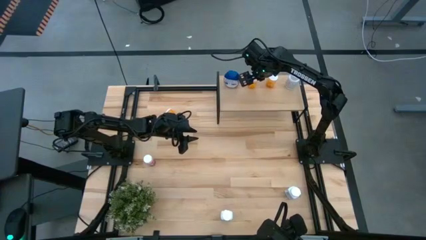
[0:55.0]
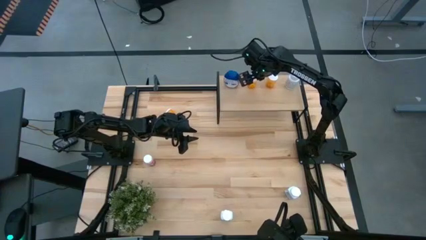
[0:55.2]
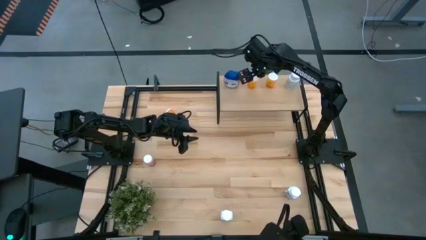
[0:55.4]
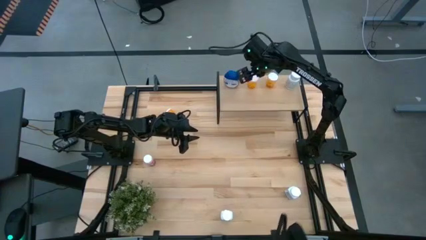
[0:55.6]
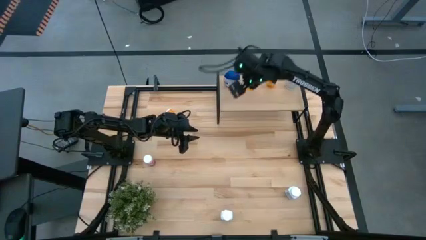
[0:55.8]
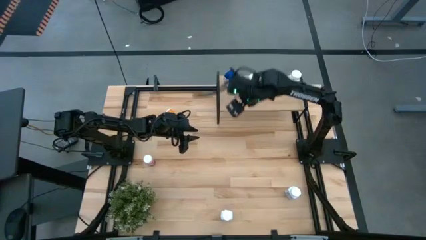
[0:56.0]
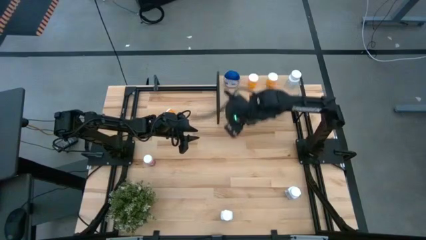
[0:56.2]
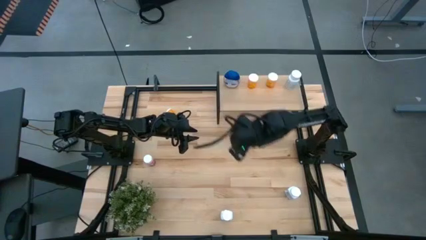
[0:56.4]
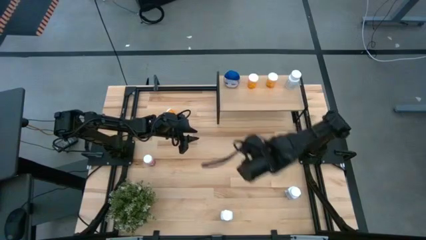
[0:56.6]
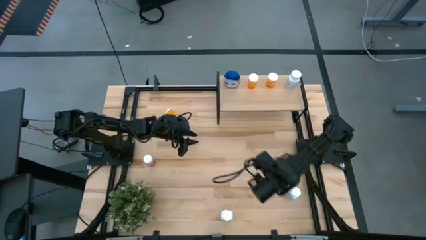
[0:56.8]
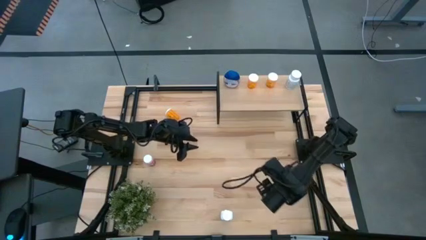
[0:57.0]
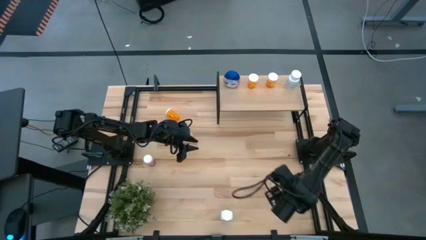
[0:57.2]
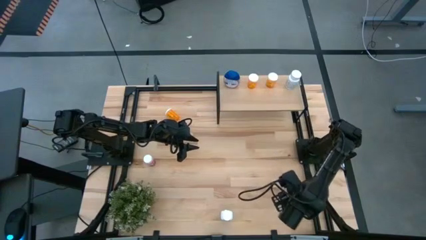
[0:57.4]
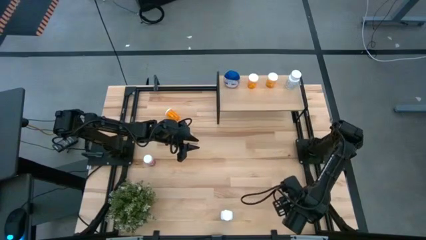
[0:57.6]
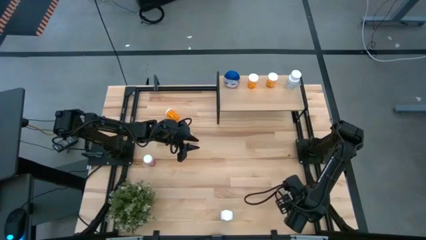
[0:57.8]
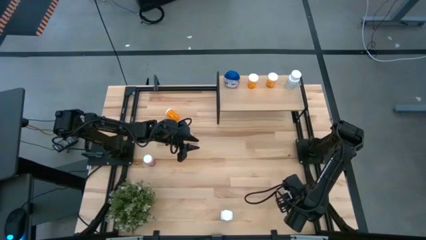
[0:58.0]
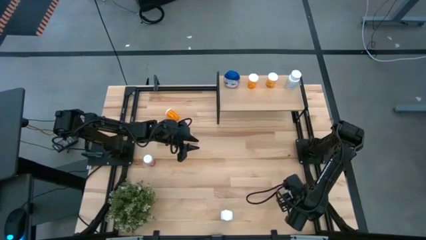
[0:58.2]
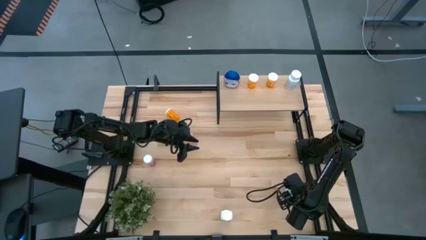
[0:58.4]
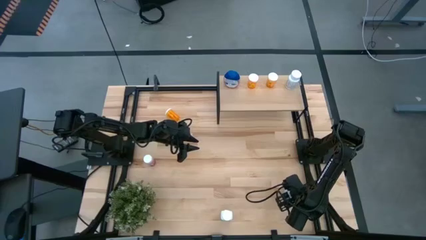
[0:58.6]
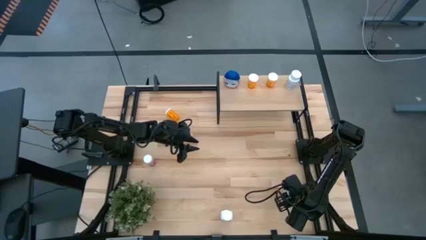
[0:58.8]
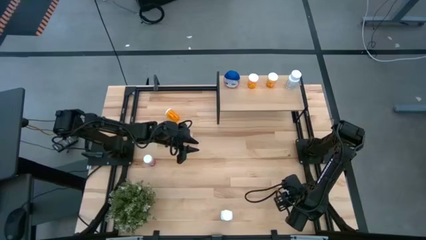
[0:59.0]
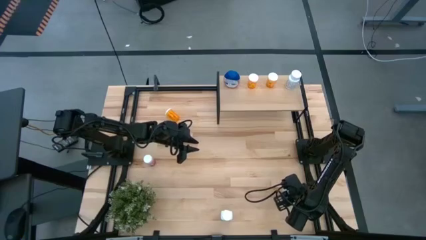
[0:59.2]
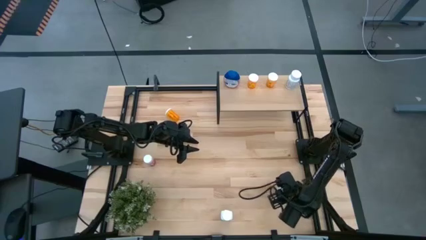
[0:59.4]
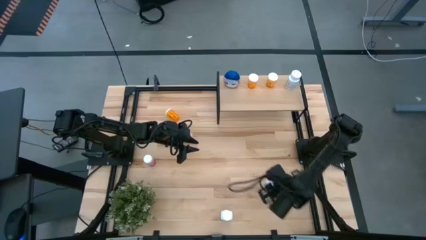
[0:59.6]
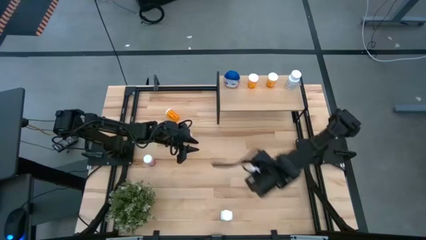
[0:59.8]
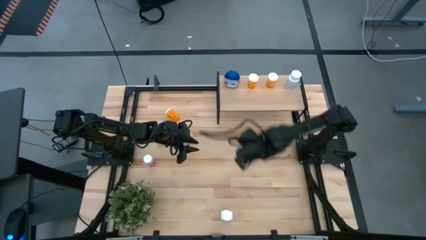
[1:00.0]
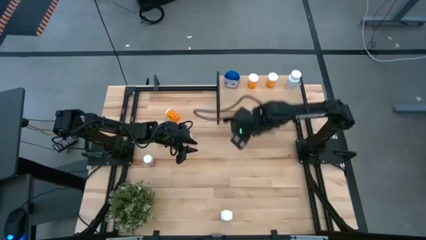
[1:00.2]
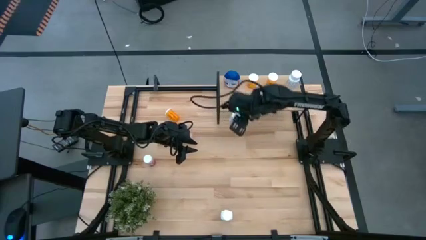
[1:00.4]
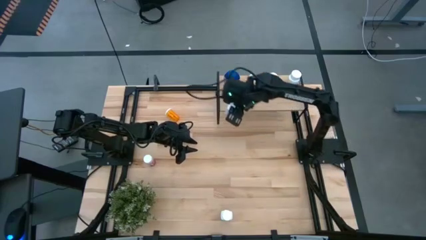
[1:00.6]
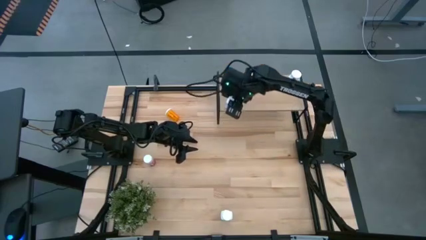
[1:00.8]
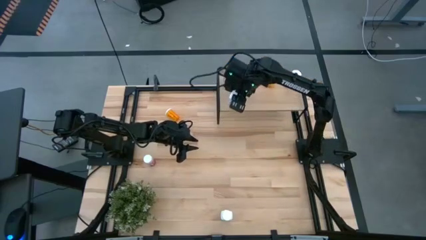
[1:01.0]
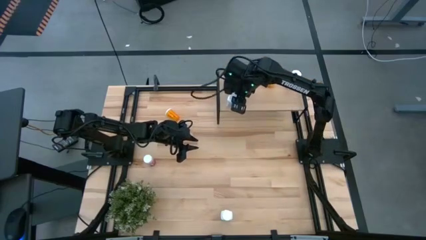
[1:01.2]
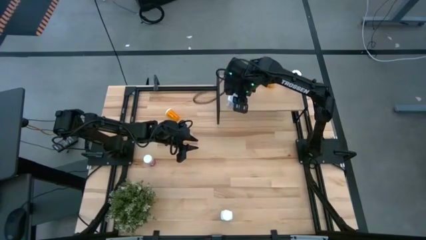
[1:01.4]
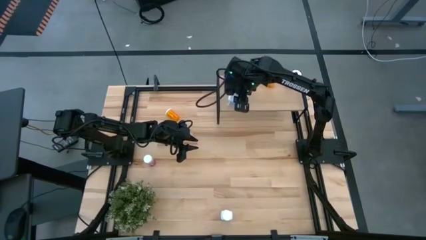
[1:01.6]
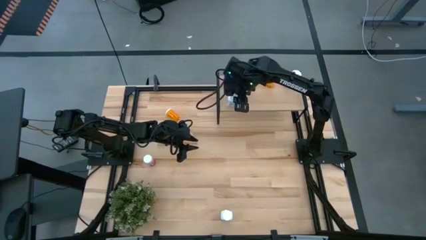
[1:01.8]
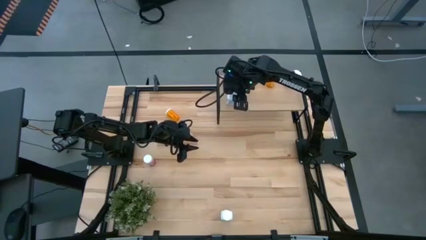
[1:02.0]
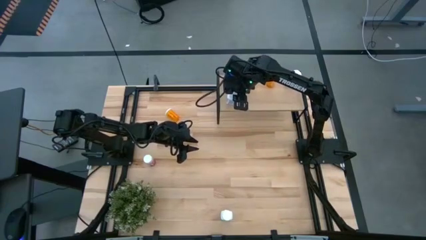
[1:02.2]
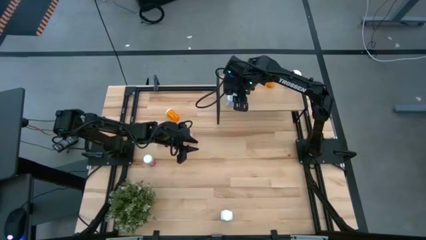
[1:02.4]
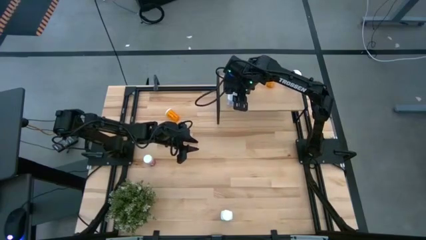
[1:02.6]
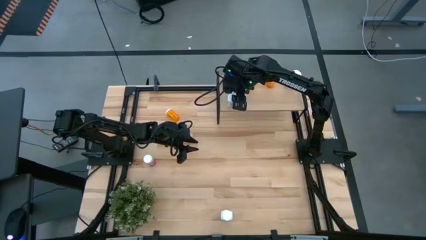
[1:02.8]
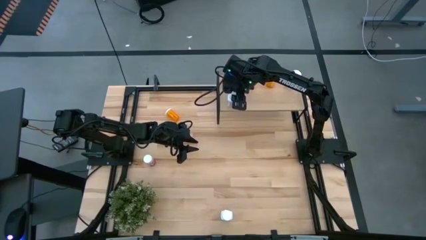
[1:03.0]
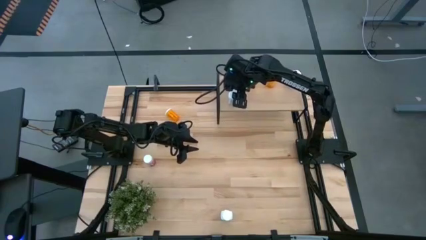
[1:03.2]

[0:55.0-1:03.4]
Task: Pick and place medicine bottles onto shelf by color
Put the right white blue pill bottle on the shelf

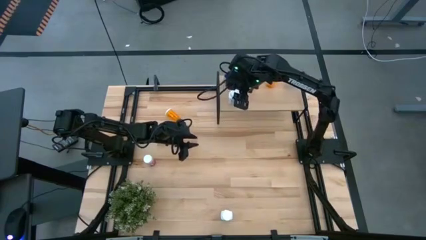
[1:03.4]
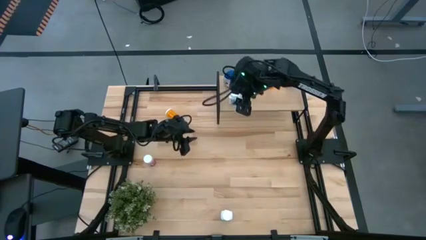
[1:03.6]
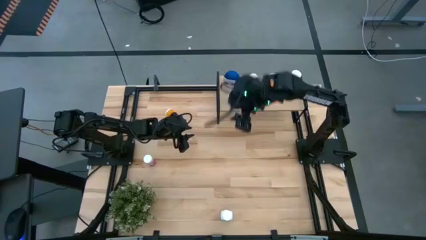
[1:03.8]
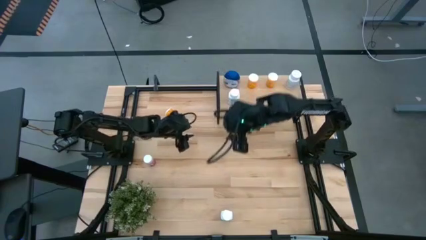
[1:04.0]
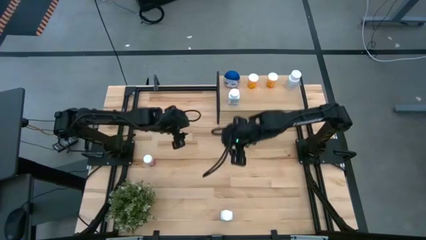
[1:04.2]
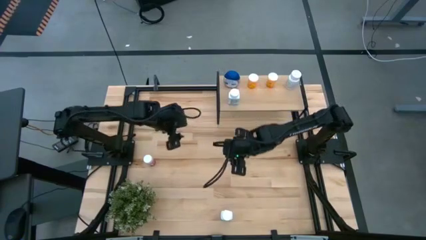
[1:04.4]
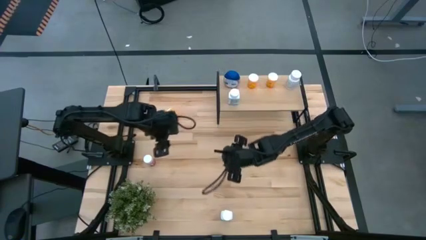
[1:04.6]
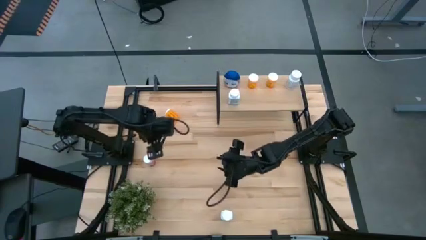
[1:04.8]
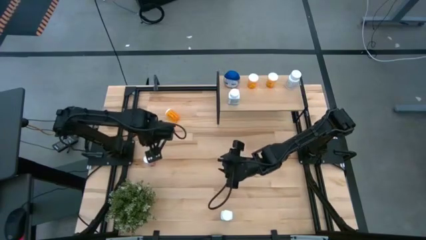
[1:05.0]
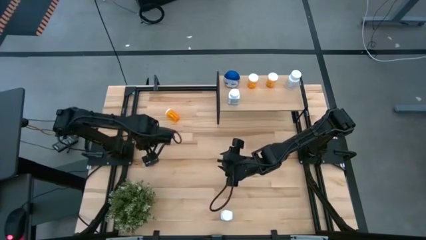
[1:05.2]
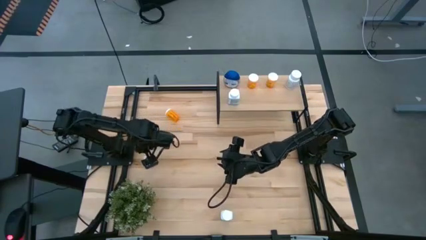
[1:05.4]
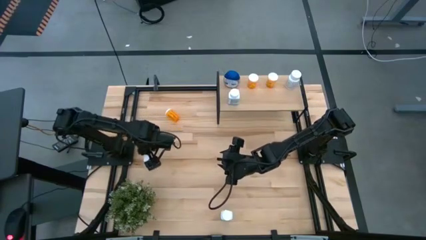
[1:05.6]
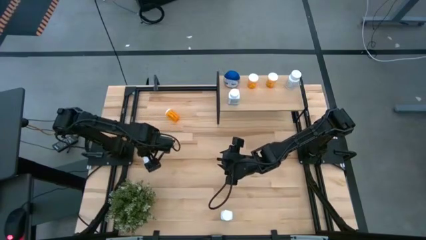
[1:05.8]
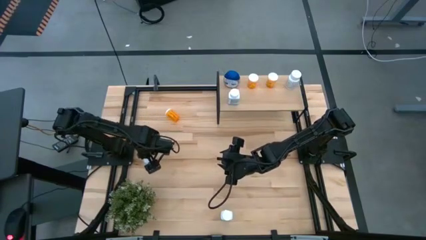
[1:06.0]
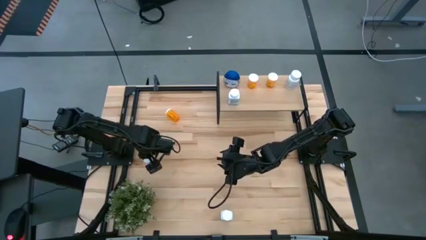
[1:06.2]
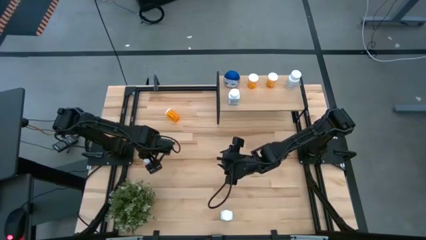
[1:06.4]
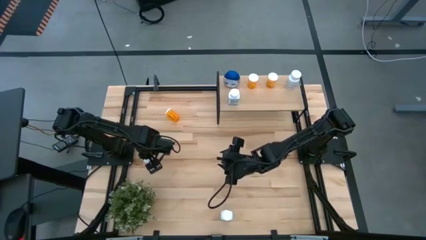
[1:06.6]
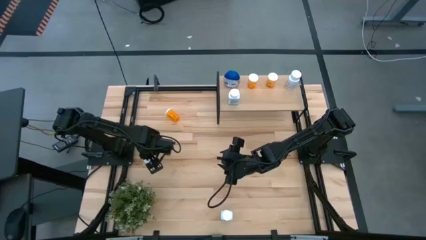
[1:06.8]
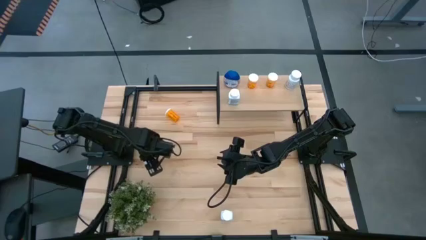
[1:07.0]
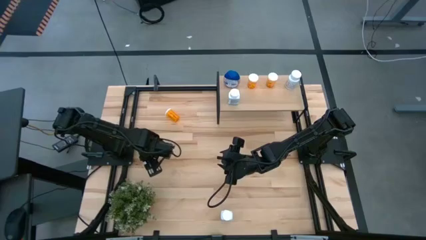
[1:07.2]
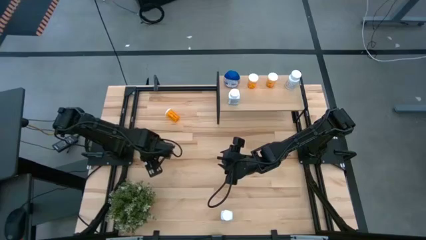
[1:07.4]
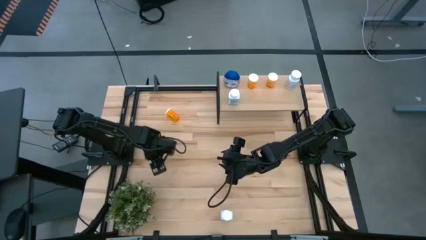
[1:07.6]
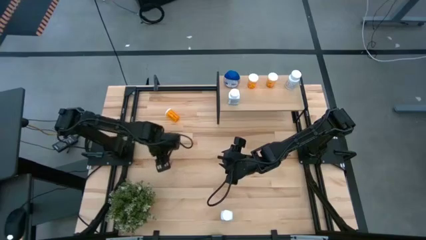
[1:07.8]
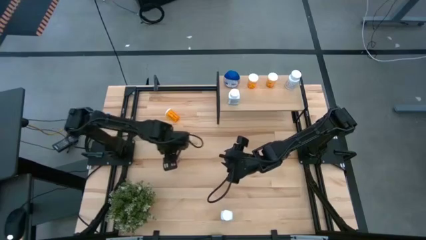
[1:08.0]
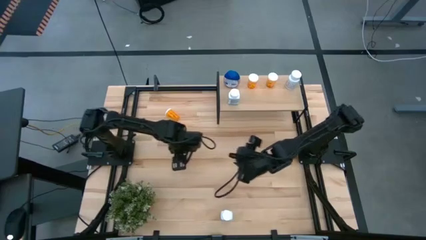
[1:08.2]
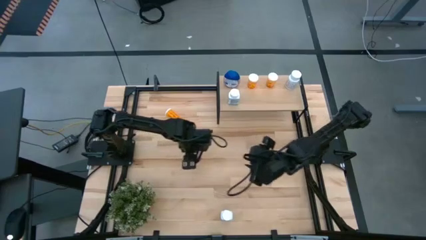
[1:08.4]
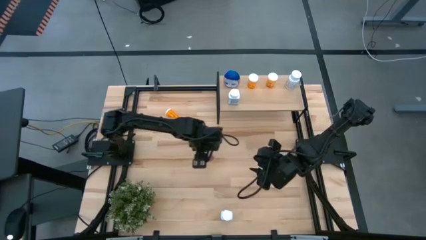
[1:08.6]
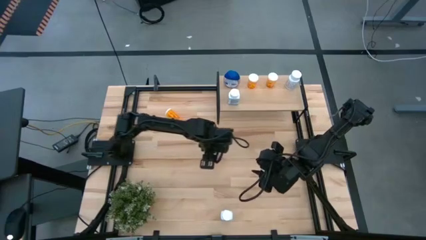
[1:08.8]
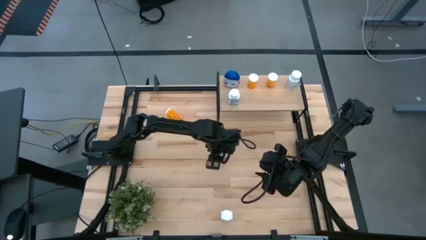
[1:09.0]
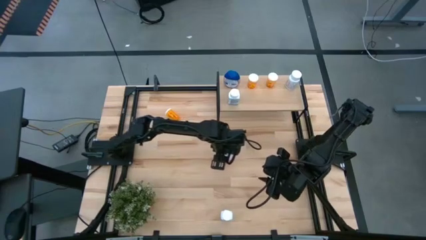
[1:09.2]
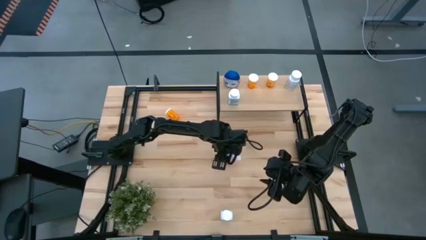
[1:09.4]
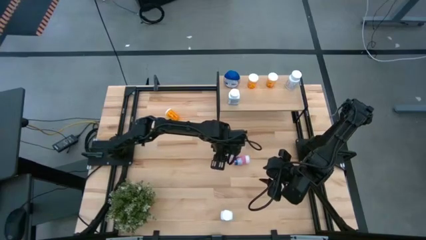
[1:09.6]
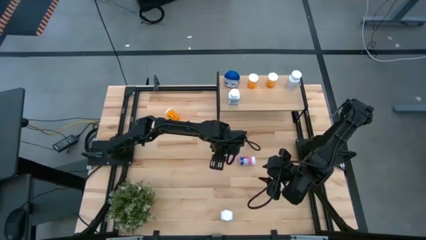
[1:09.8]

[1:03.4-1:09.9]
Put the pink pill bottle on the shelf
